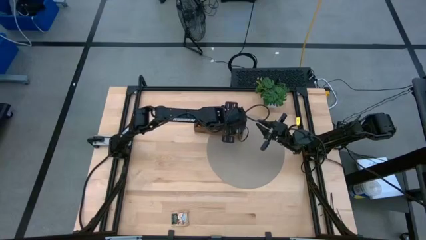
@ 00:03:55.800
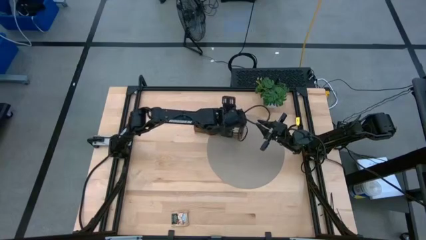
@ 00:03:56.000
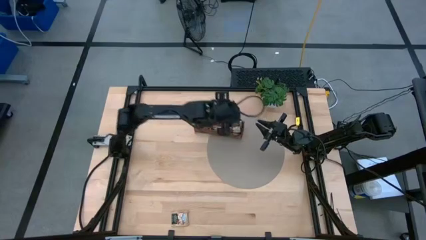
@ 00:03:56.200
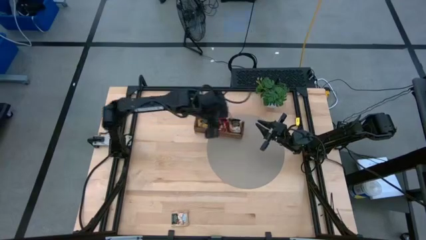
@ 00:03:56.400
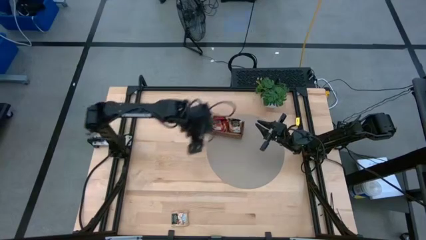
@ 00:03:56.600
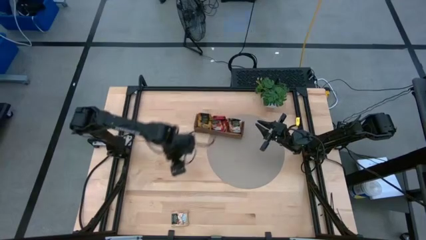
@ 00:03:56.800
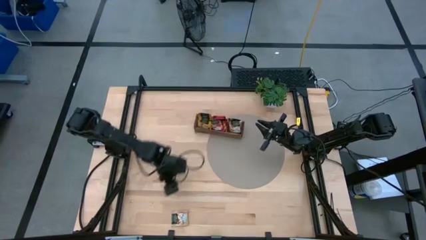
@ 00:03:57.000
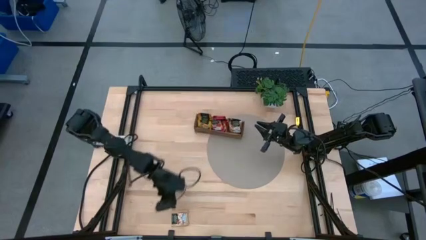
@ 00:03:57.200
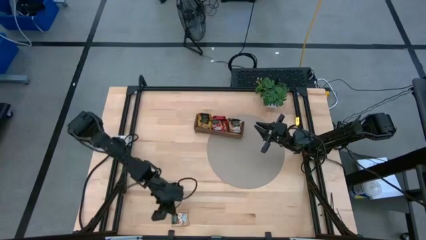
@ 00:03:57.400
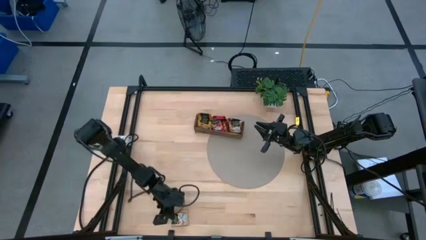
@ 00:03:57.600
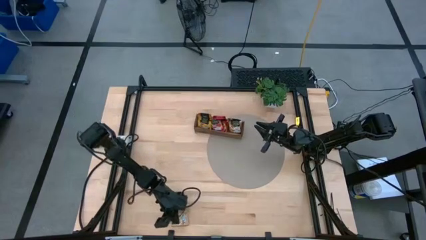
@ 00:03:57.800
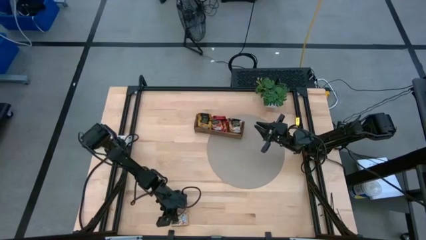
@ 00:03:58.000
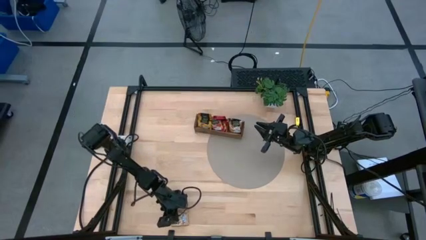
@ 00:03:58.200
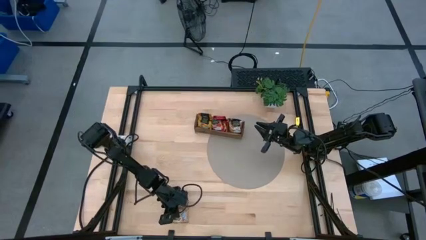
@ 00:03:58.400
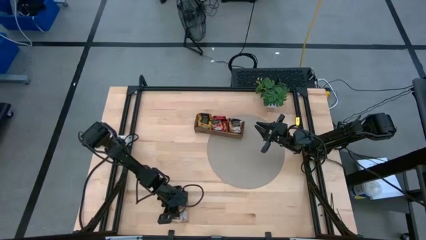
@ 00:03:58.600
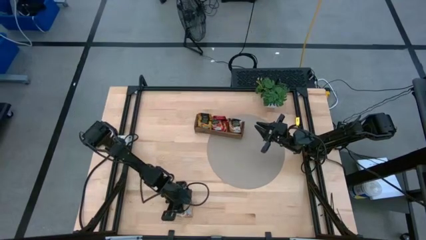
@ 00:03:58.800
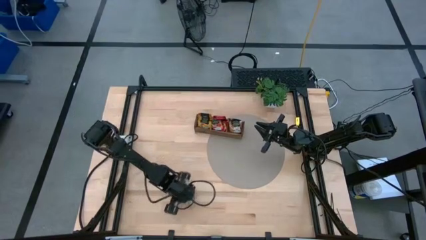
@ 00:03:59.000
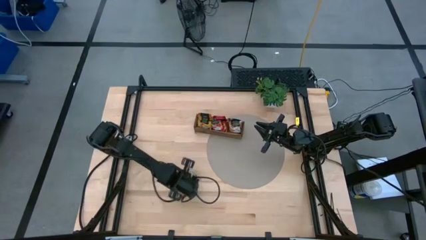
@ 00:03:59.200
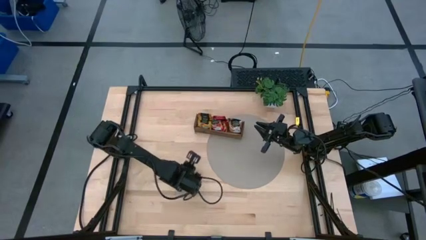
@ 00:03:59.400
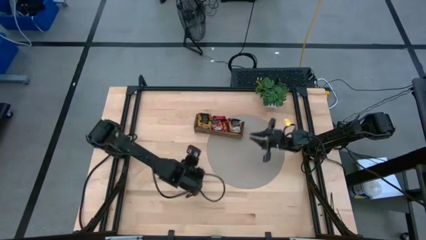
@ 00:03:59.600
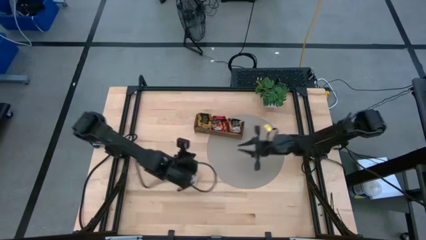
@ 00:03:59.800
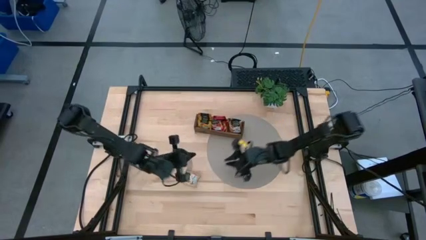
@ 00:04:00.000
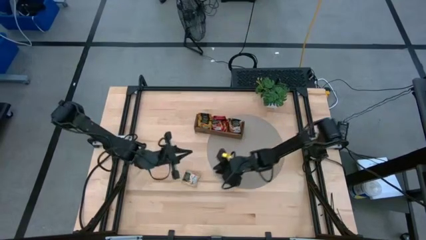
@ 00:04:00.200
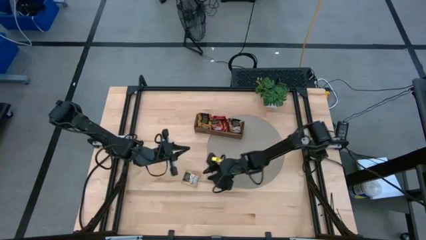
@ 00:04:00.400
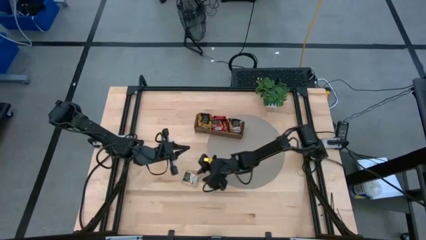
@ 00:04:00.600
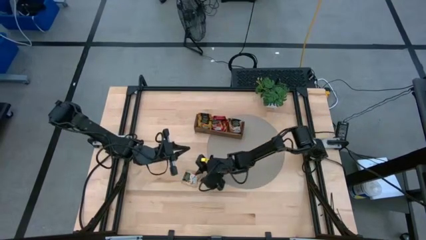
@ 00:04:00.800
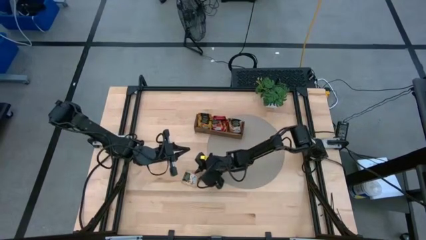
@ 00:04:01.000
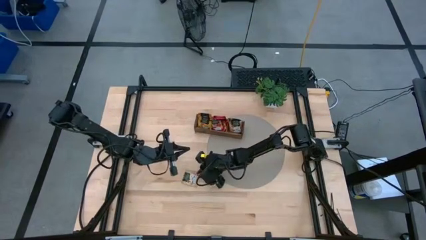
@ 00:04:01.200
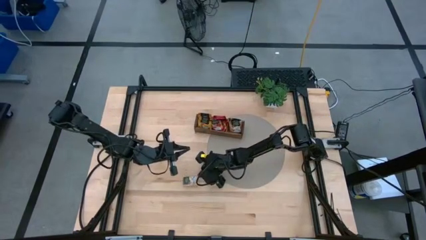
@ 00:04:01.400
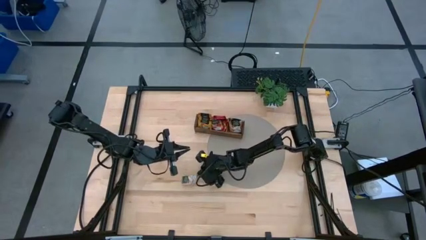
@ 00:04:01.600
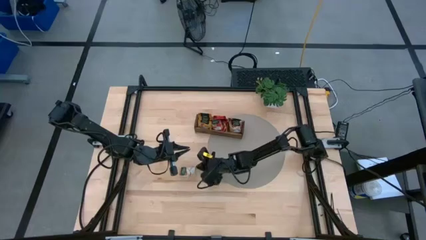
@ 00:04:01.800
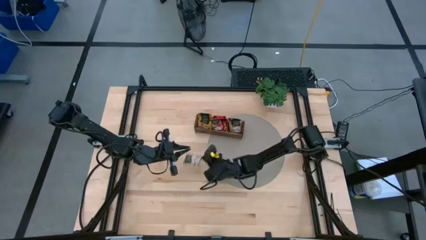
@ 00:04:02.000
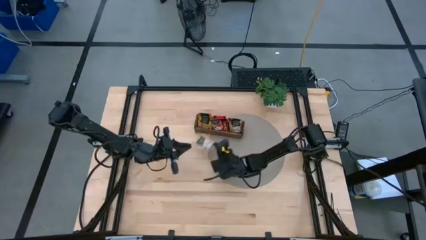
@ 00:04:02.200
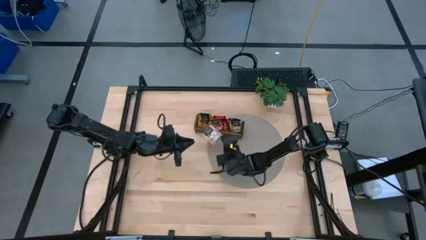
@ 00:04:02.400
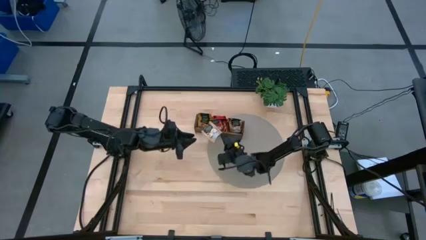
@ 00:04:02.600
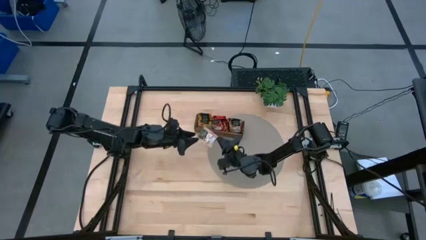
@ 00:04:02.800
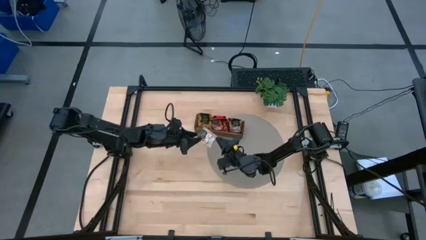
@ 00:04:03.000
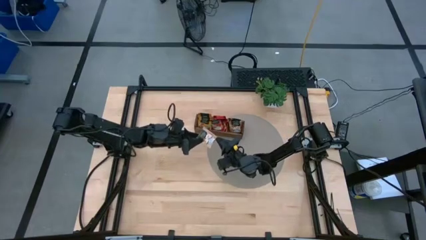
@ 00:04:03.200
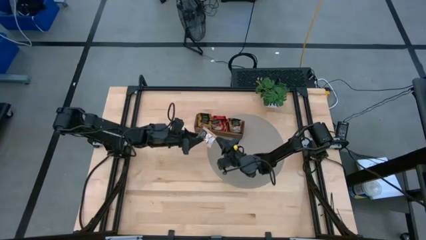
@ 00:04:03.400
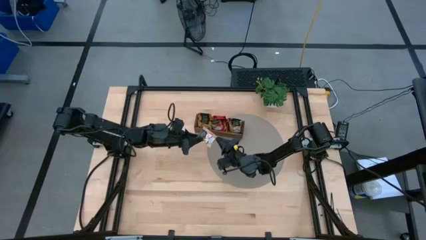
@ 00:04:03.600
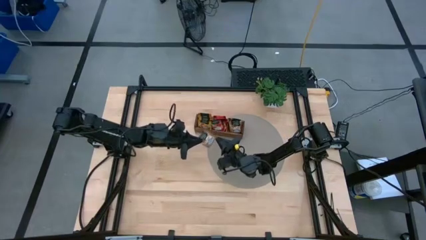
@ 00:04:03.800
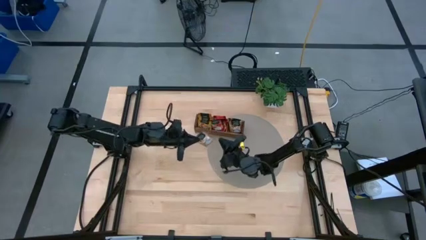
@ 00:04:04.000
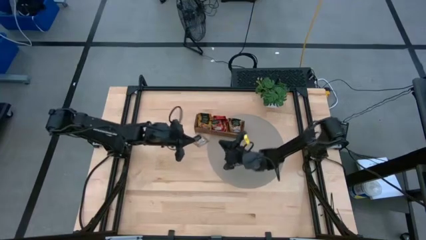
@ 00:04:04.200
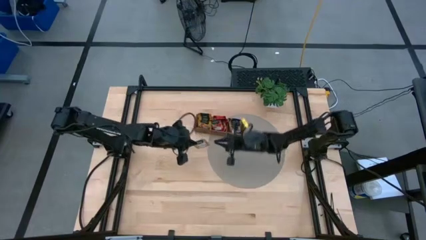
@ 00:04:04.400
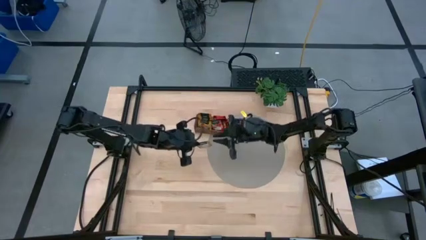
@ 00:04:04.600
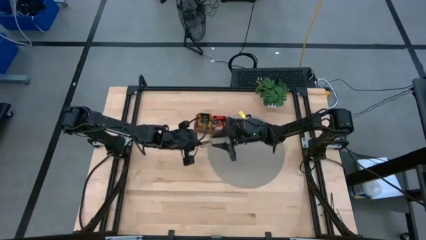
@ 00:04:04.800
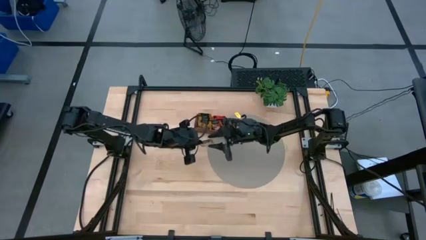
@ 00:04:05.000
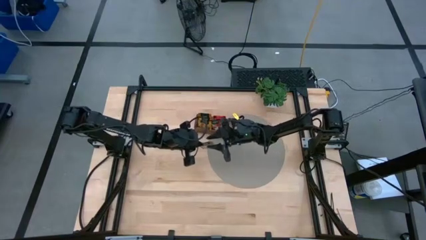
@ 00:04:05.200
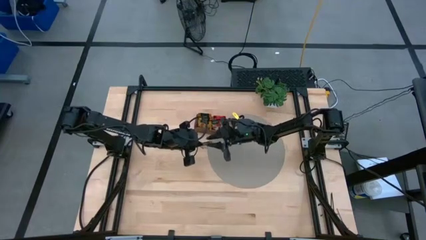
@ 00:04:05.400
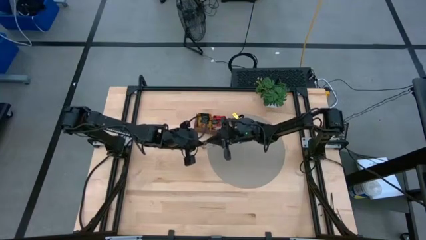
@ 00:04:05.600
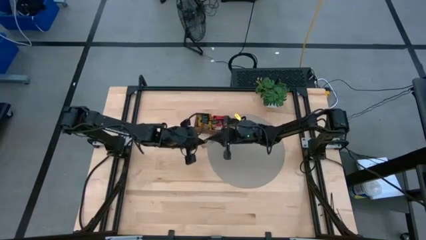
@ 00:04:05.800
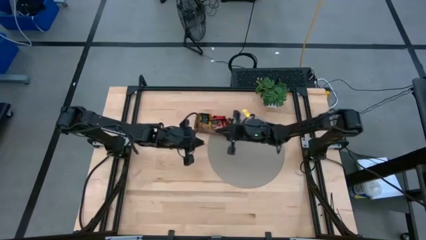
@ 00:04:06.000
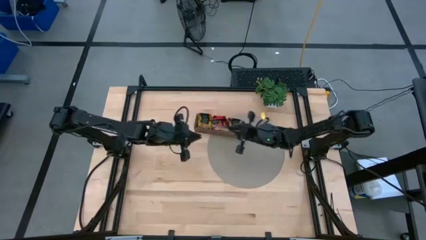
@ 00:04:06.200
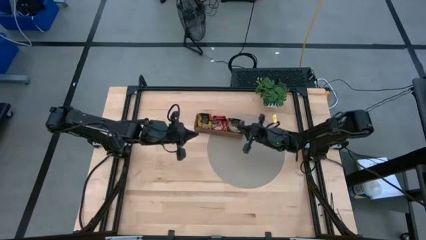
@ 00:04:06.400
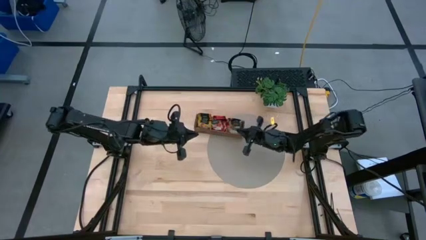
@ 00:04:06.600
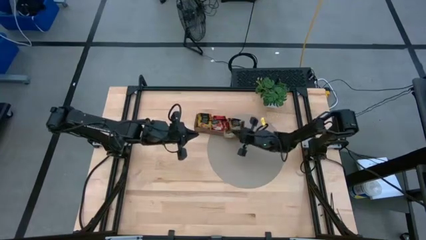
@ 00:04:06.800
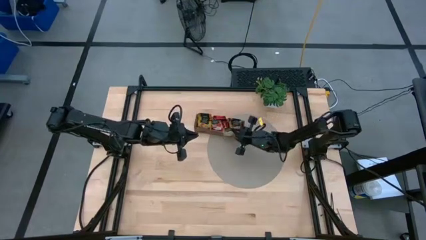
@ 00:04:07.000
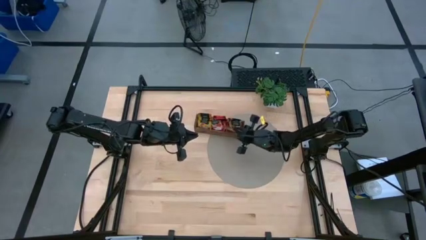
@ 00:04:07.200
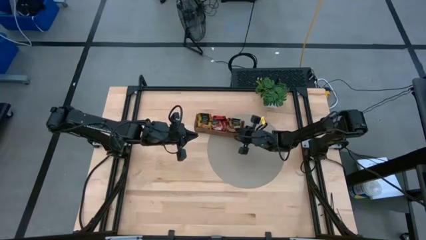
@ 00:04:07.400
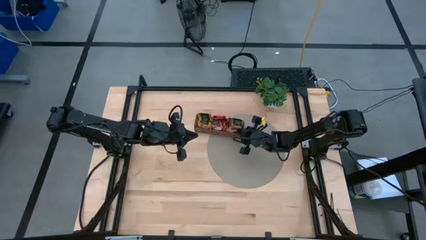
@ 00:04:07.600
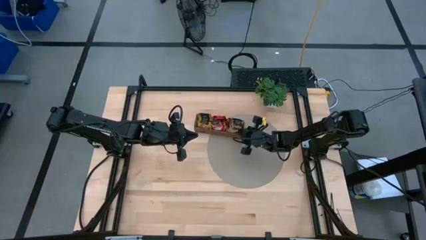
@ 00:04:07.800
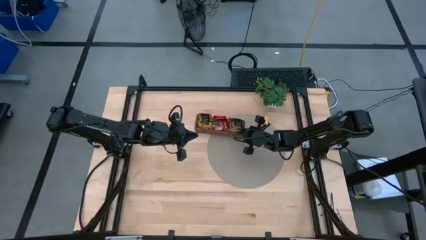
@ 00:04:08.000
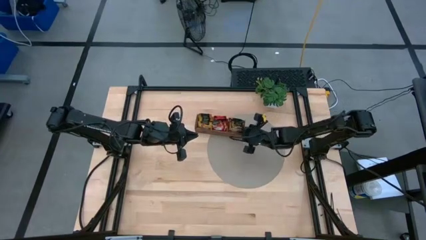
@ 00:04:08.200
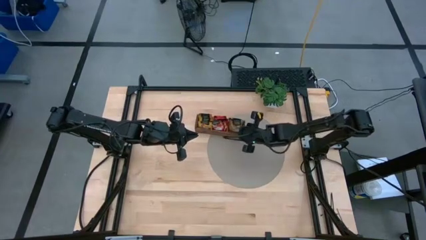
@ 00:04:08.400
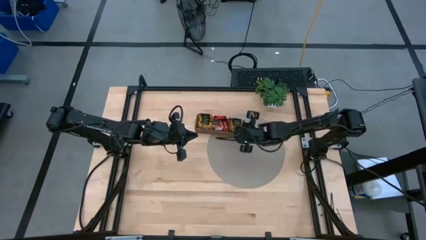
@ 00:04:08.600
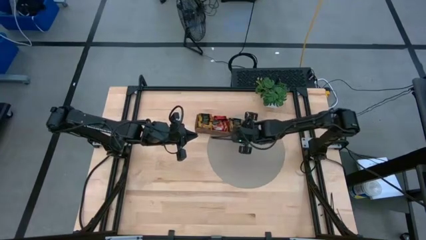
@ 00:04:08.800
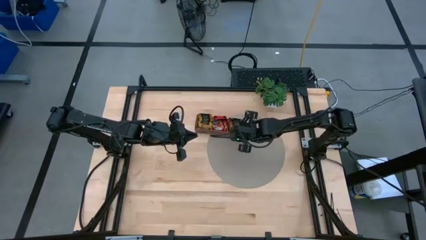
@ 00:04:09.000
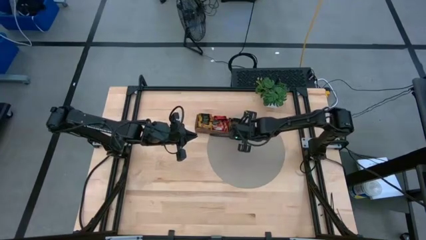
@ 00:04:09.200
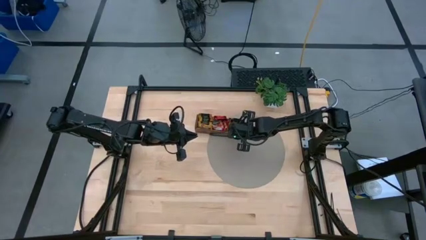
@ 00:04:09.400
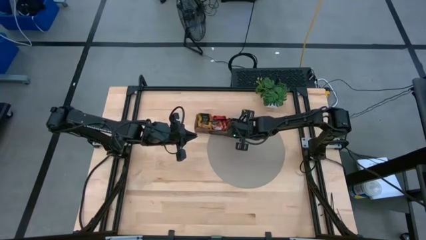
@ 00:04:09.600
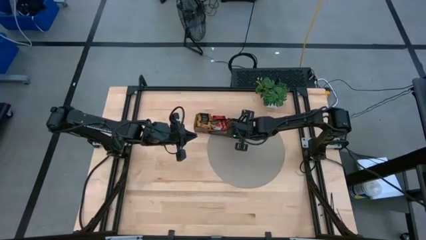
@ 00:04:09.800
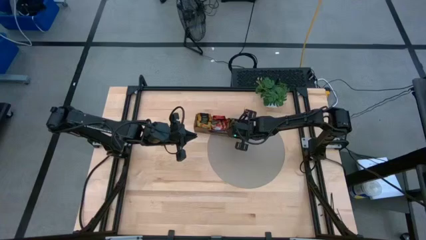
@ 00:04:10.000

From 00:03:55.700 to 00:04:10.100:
Task: Pick & Place Tea
Put the brown tea bag into the right section of the wooden organizer
